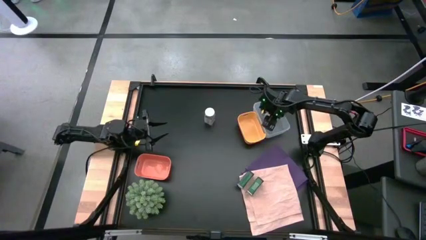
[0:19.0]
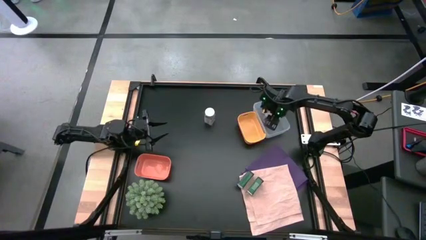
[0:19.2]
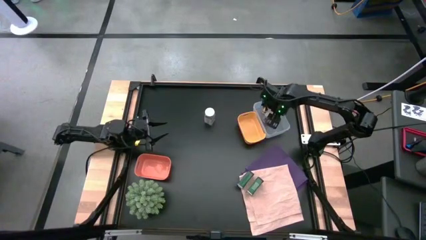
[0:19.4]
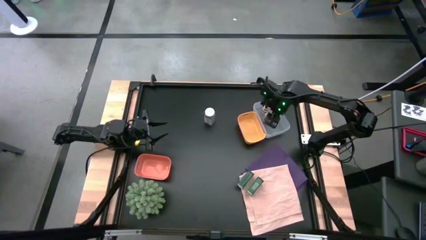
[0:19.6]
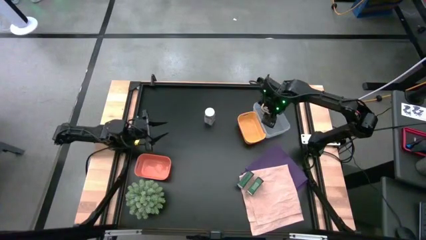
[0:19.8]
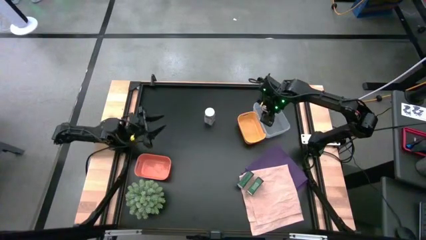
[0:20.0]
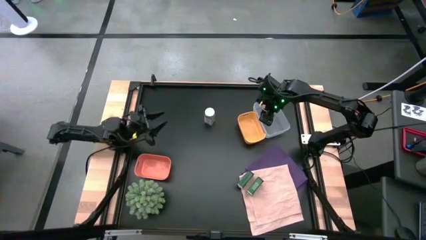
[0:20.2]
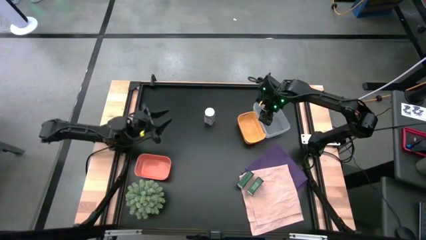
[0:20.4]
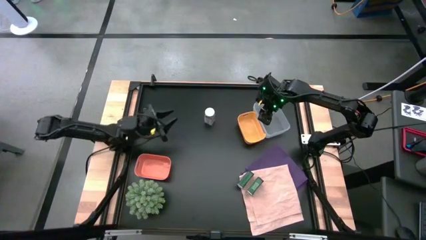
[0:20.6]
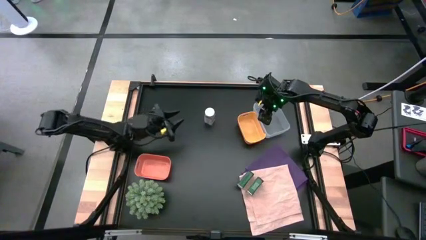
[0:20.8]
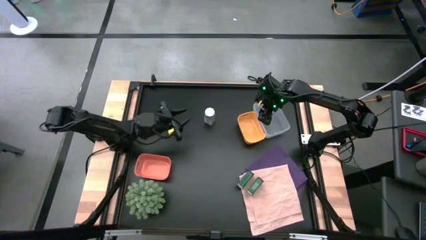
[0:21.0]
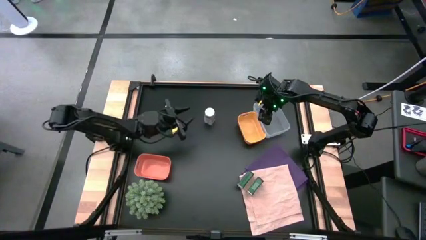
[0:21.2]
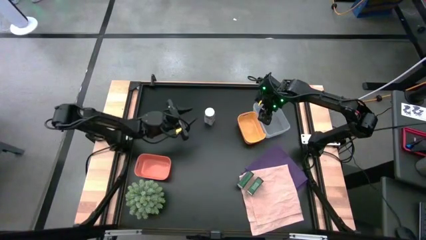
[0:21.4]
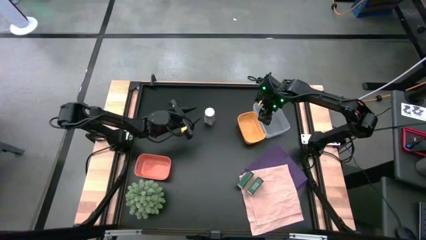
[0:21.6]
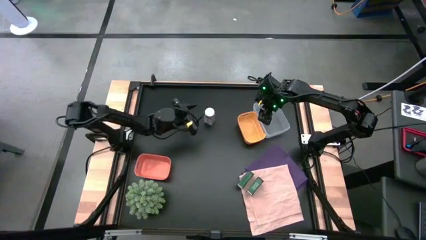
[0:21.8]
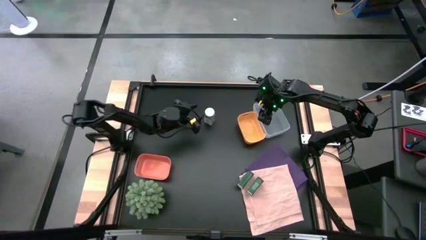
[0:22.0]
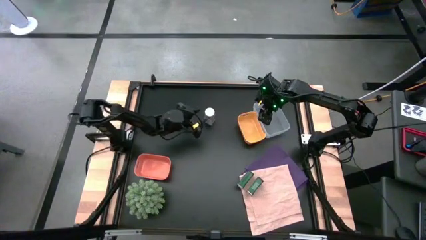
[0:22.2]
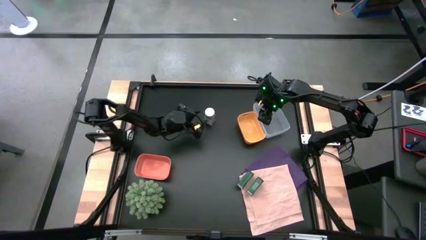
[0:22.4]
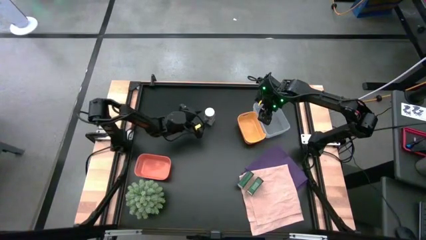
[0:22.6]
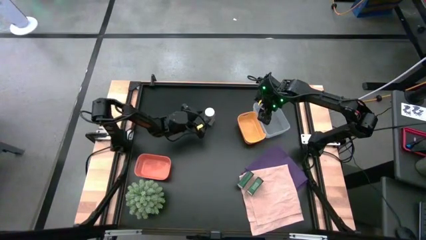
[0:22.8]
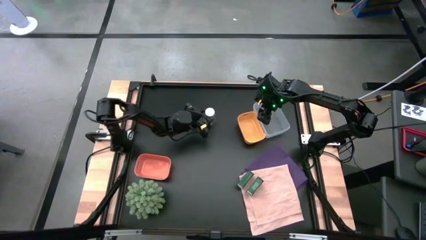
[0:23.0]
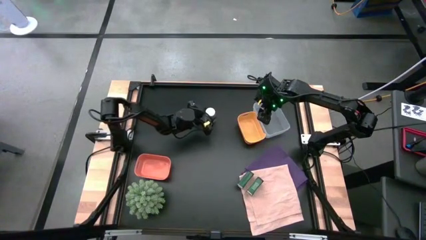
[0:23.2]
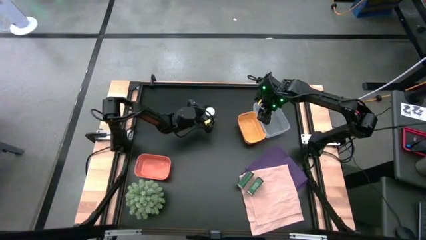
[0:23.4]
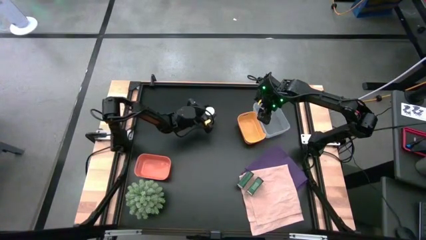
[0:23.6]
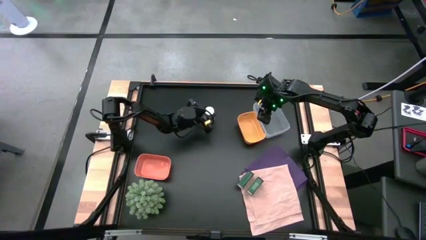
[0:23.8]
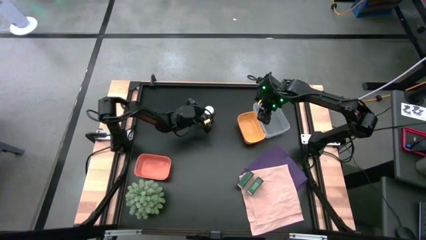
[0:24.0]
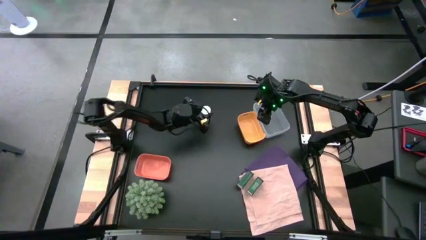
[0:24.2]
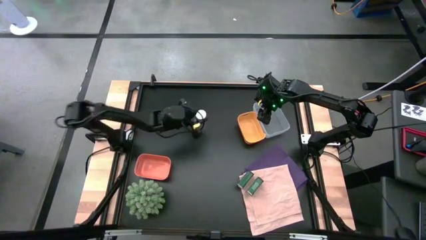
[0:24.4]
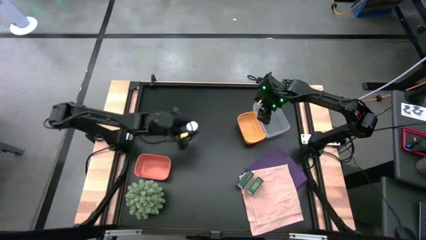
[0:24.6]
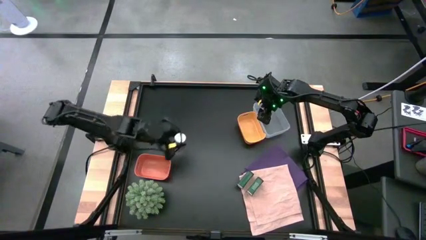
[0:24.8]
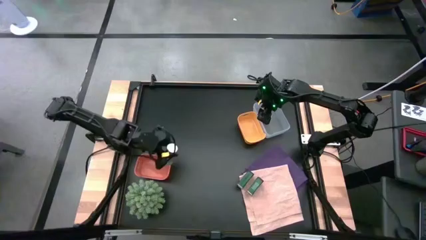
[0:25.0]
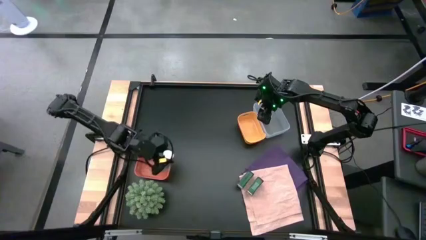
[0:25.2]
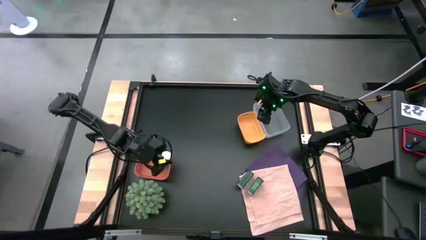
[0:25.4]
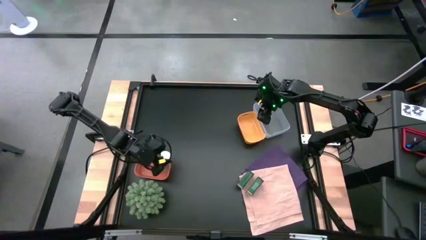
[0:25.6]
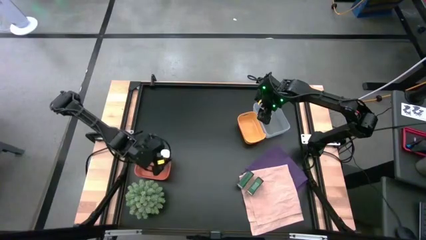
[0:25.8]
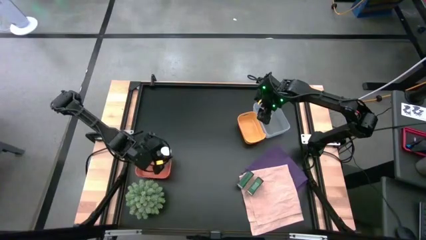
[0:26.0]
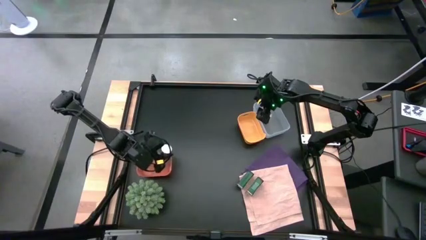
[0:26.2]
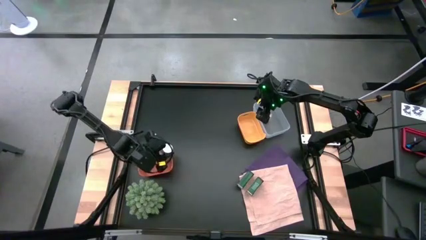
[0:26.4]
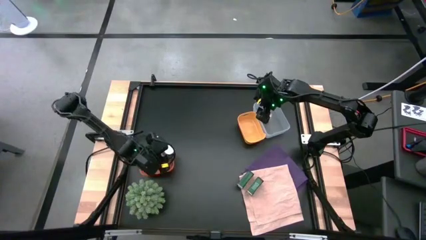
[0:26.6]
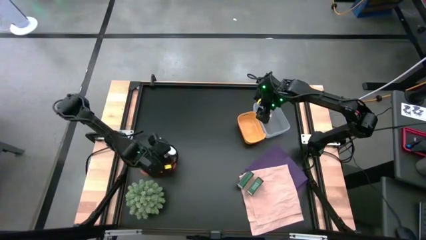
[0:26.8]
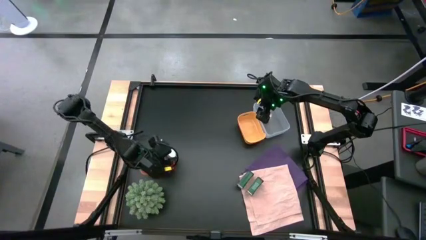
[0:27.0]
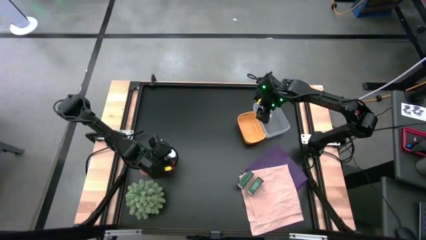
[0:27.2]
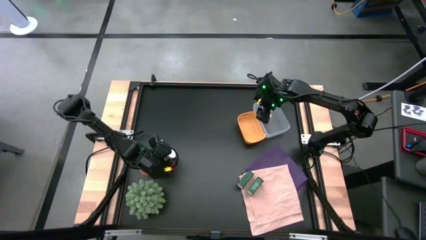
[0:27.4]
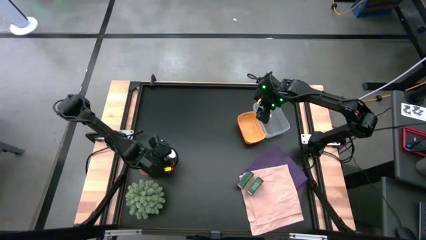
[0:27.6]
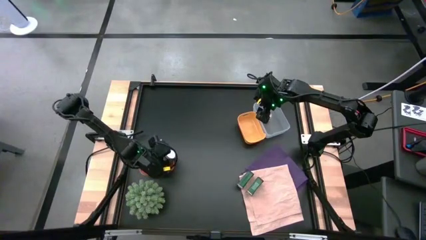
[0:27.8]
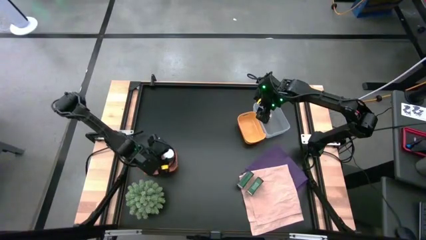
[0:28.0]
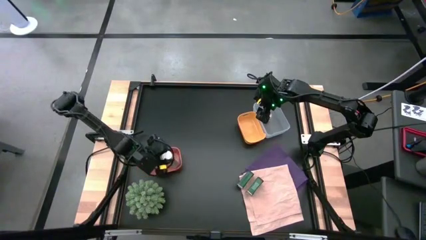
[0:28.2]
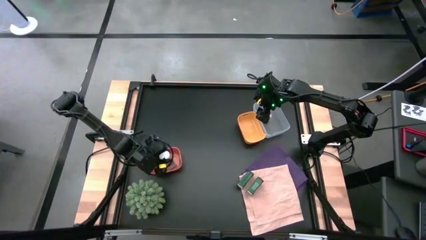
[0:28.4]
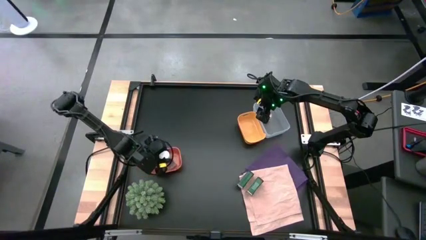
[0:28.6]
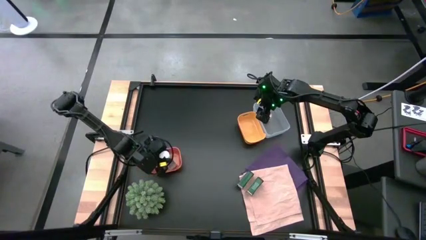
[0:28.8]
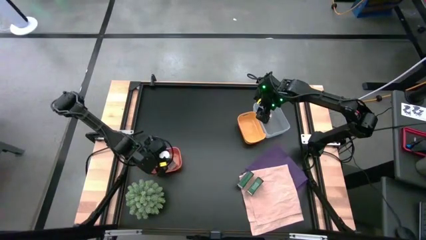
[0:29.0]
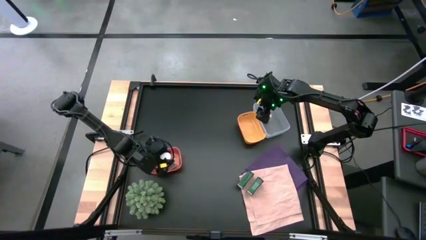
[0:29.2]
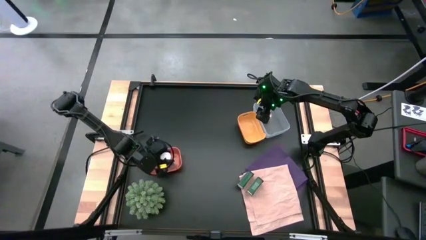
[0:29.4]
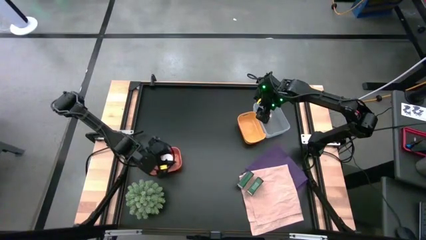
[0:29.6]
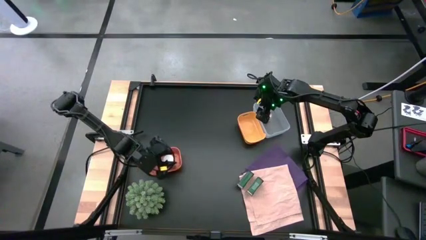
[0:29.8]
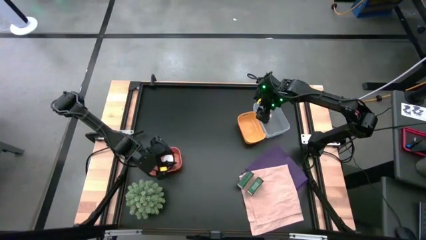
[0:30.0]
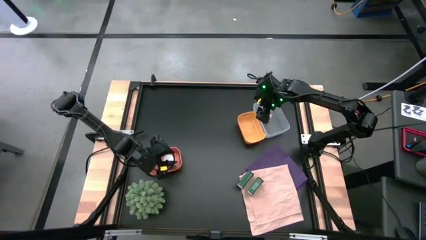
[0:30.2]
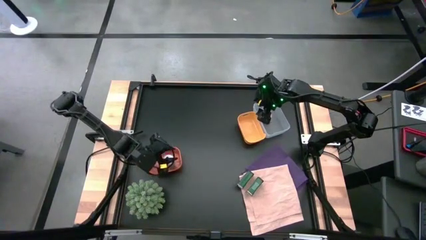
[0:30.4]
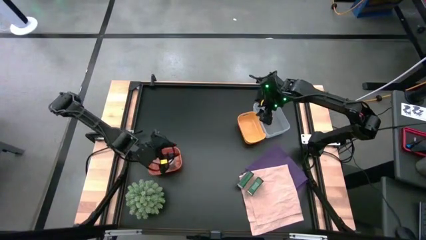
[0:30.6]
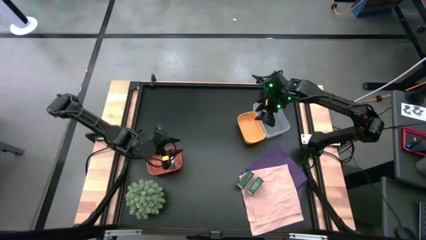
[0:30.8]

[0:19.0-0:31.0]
Task: Sort spices by type
Put the white seasoning bottle into the orange bin

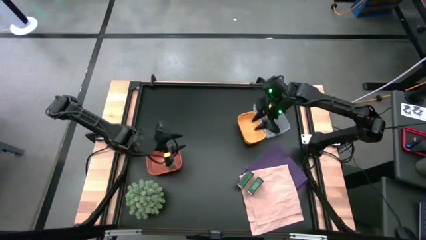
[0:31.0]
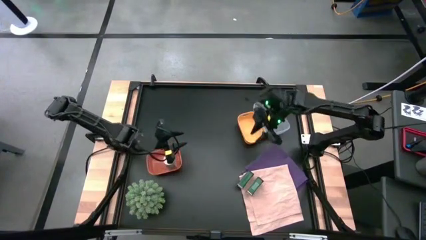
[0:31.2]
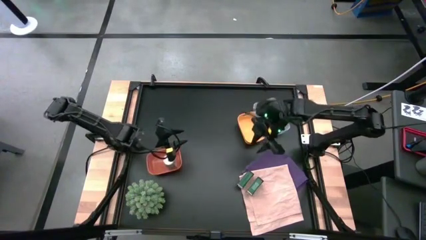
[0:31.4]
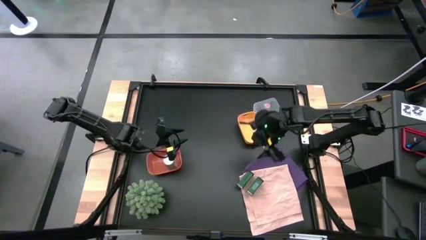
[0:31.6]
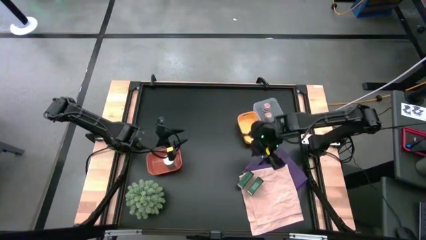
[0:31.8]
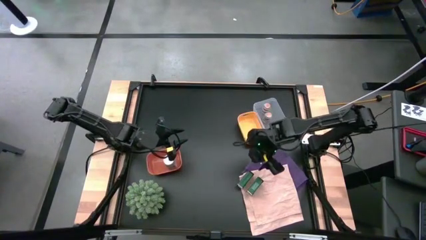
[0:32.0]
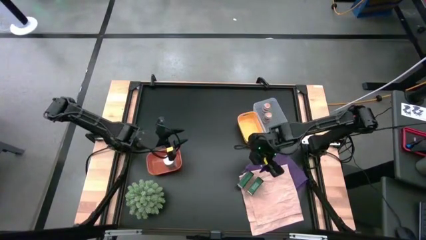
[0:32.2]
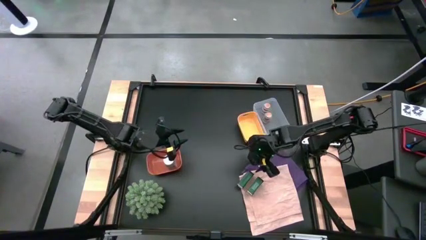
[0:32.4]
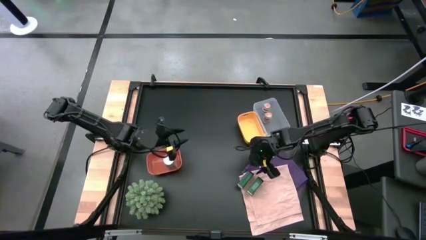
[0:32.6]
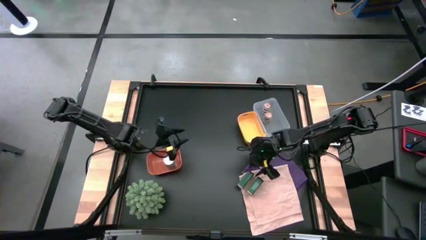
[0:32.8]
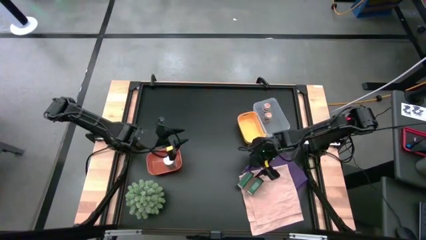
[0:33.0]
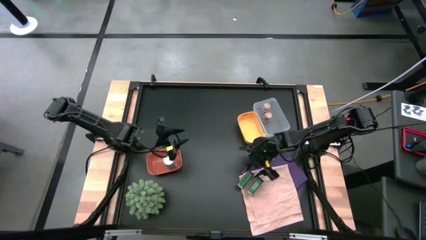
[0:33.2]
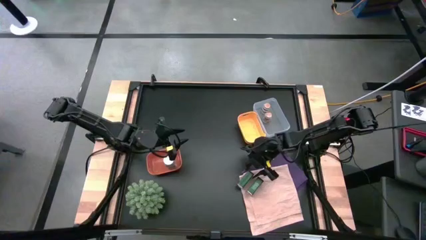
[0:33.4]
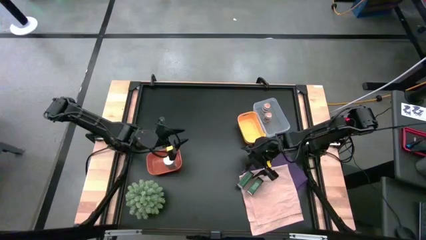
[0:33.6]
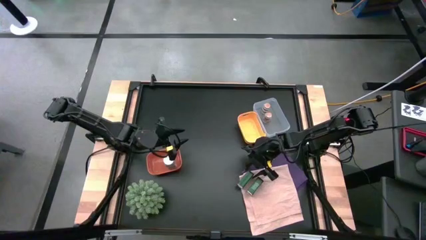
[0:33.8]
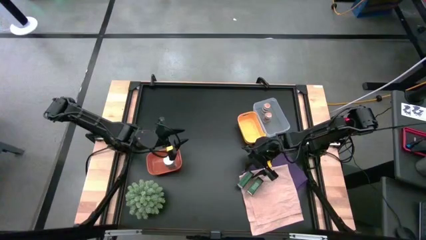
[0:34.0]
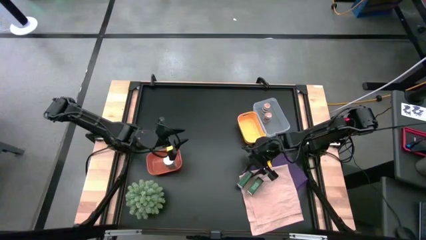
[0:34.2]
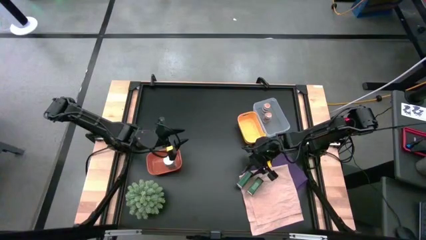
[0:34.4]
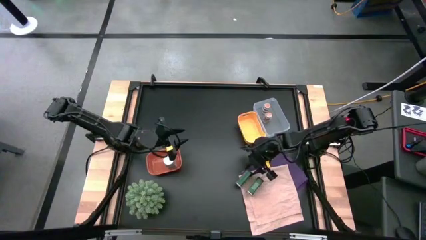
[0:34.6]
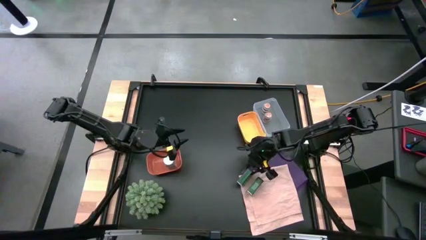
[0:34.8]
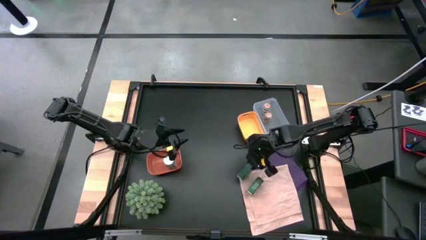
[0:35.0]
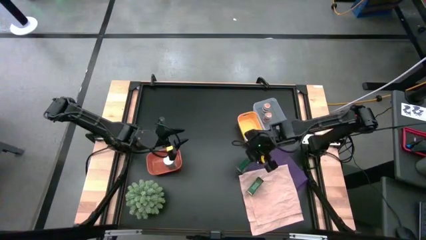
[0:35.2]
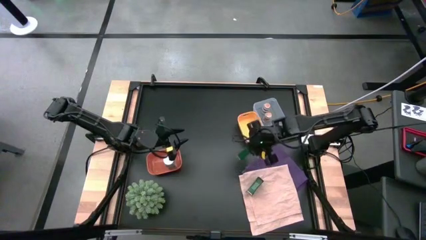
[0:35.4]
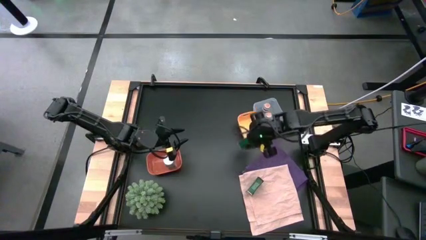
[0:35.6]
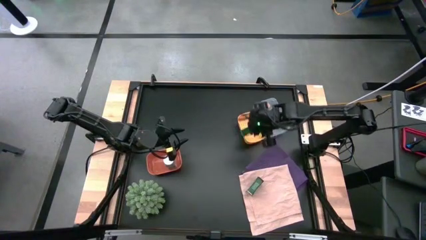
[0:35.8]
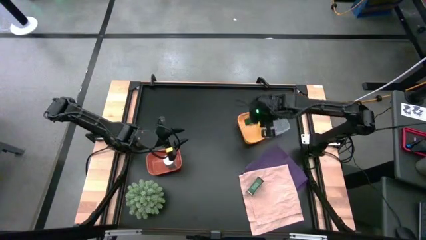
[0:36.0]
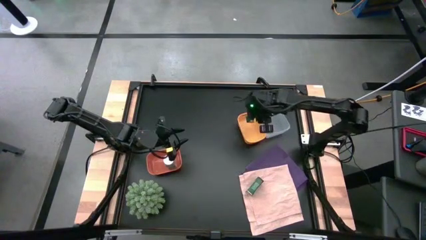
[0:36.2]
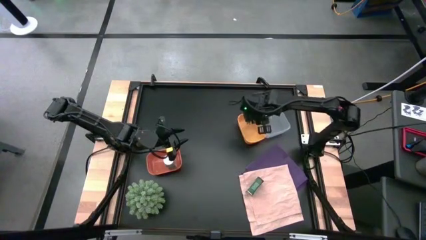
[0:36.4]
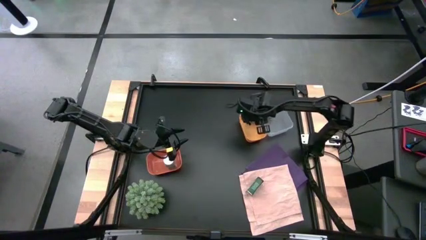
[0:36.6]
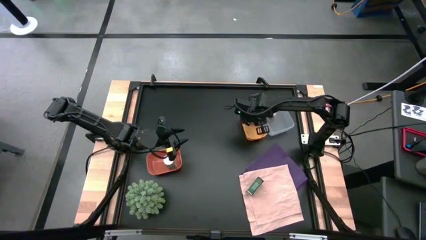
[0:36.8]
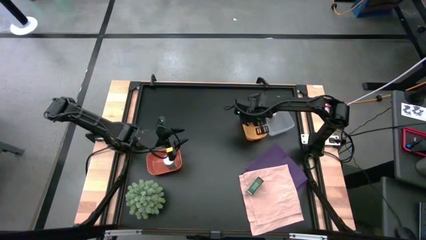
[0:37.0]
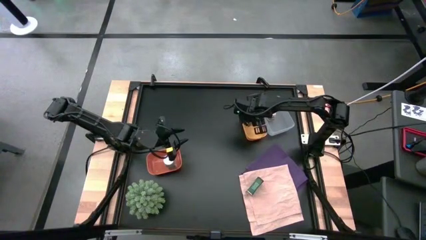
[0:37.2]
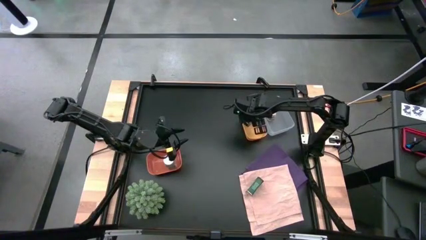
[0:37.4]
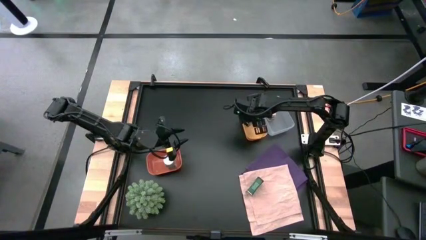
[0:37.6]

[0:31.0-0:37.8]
Put the left green seasoning can into the yellow bin
